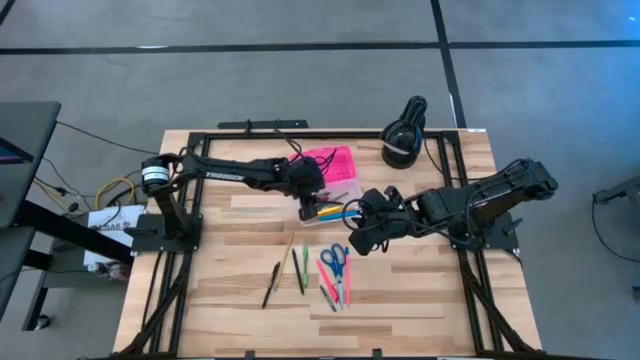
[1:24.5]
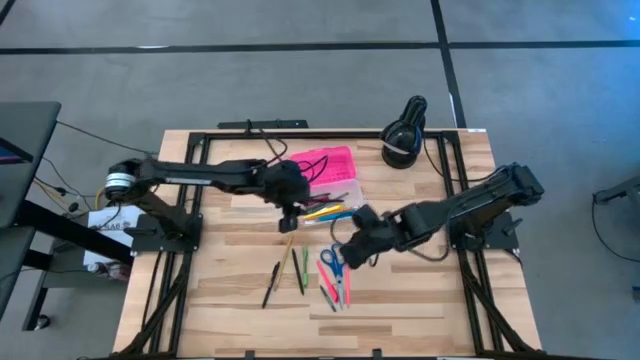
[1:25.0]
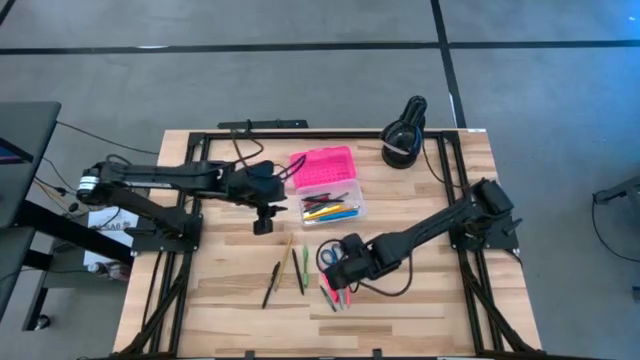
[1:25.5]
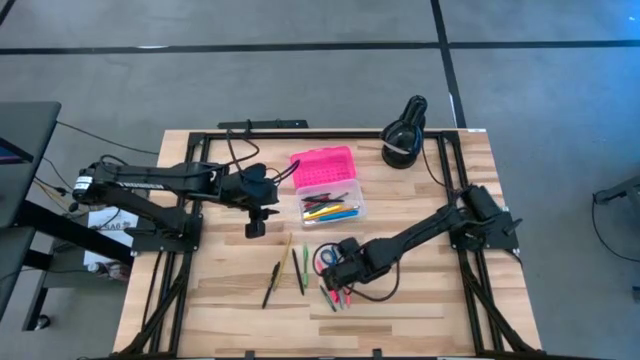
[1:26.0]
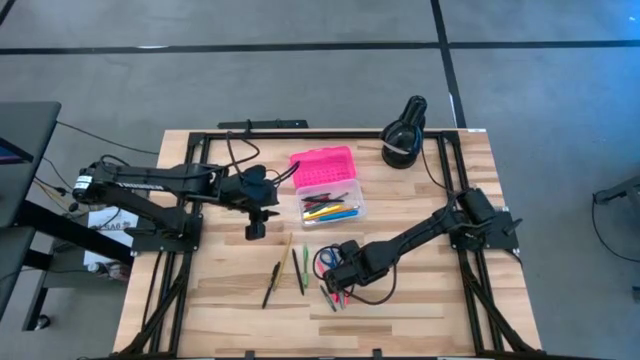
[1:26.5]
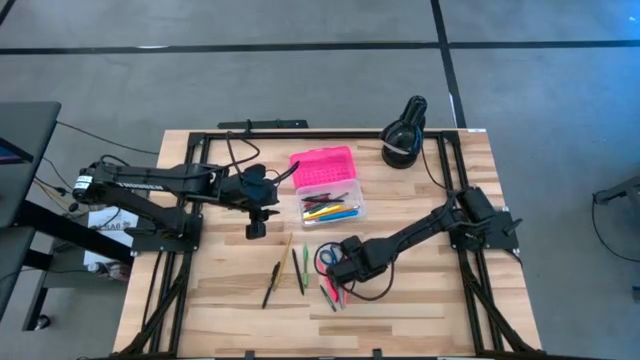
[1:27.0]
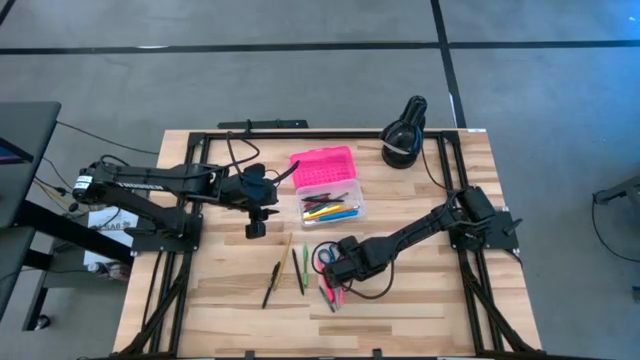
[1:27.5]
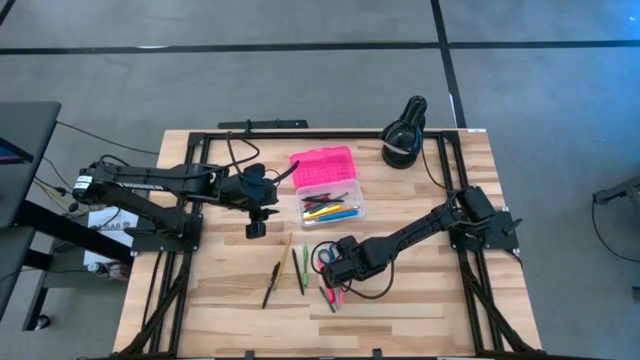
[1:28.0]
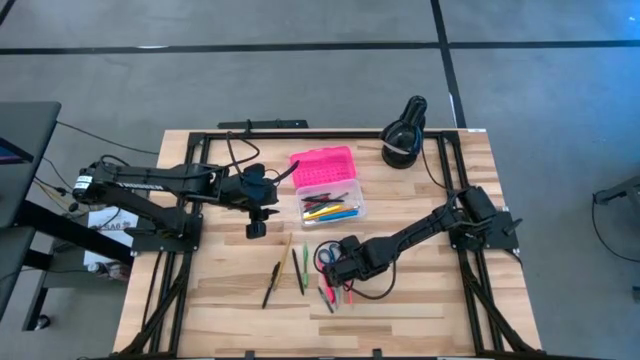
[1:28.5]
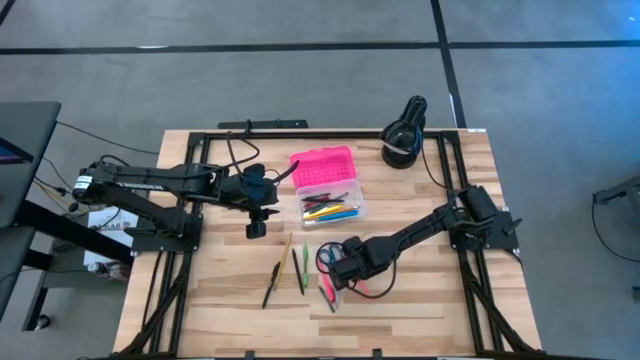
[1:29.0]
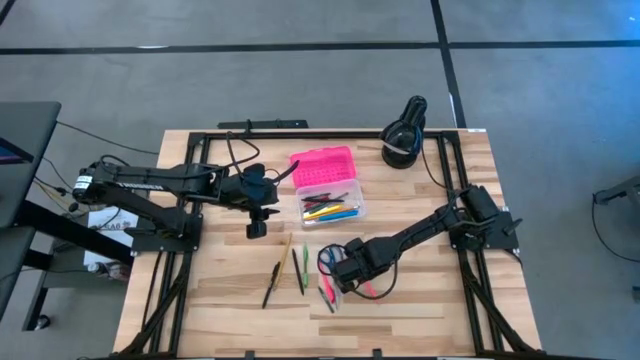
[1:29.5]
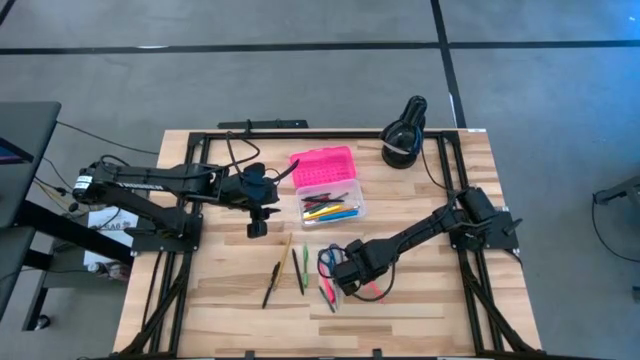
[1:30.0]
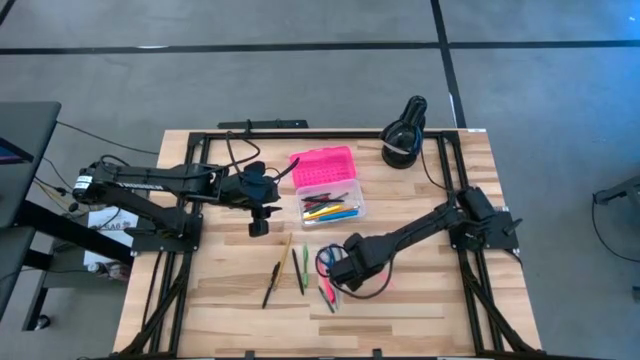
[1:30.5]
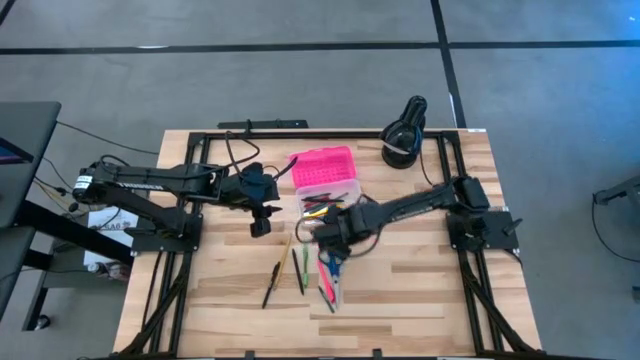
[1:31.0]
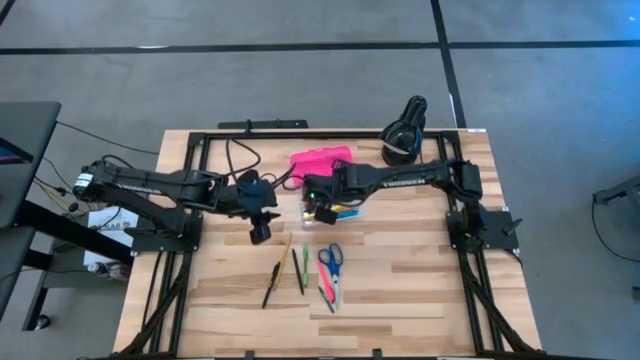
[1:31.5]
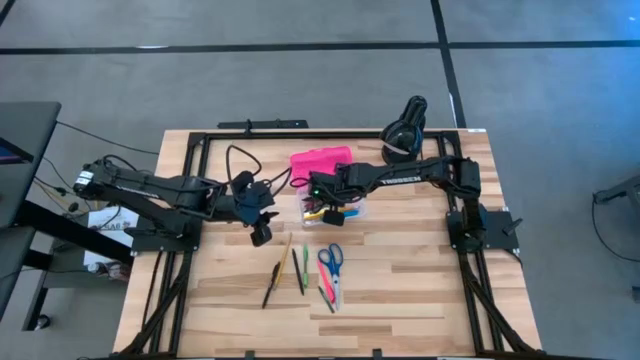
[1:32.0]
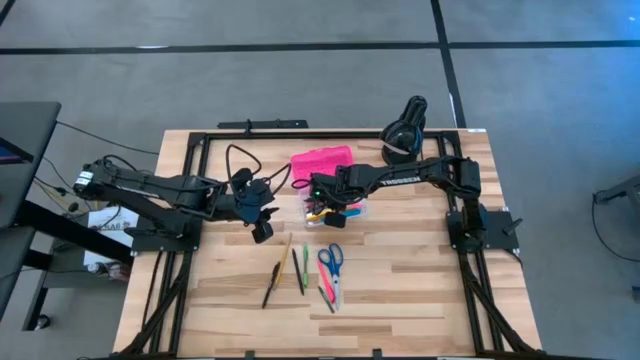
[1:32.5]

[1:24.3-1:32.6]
Task: Pick & place school supplies into a supply box
Put the pink pencil into the pink supply box

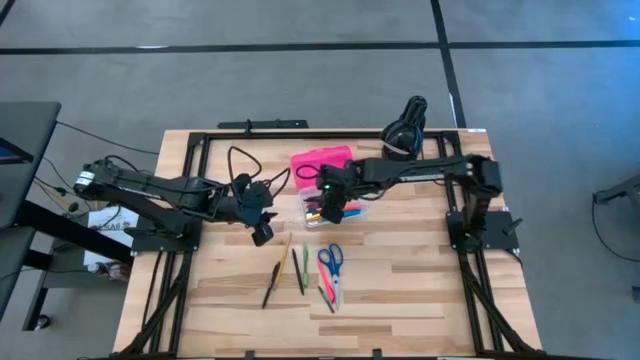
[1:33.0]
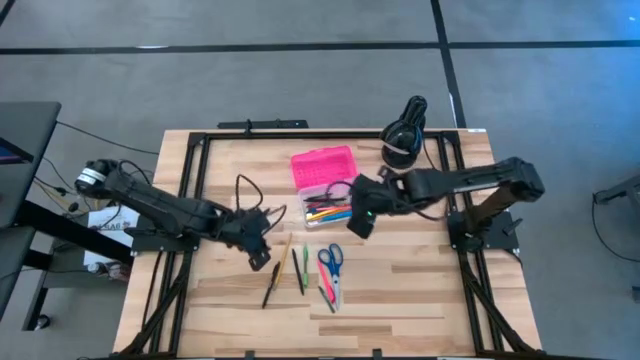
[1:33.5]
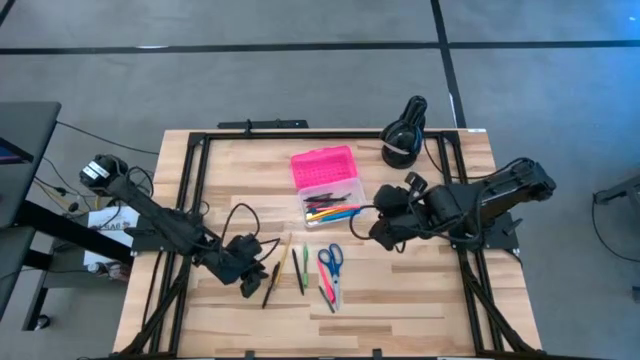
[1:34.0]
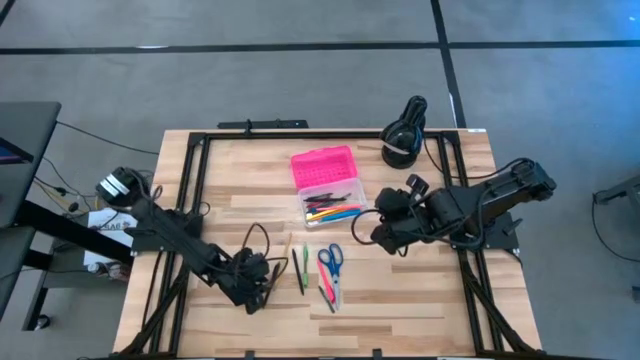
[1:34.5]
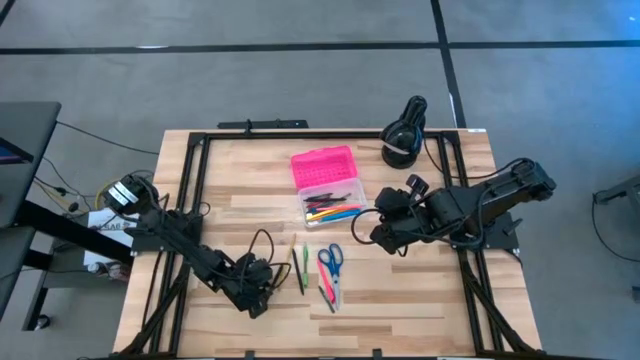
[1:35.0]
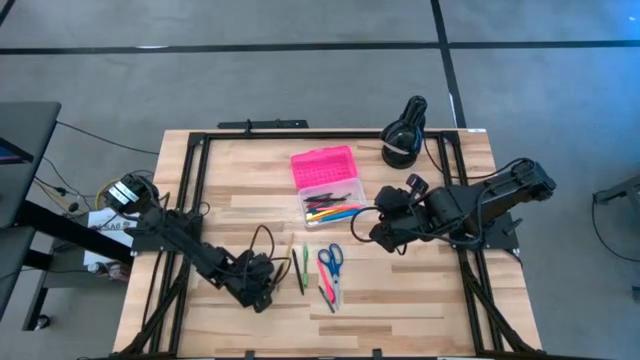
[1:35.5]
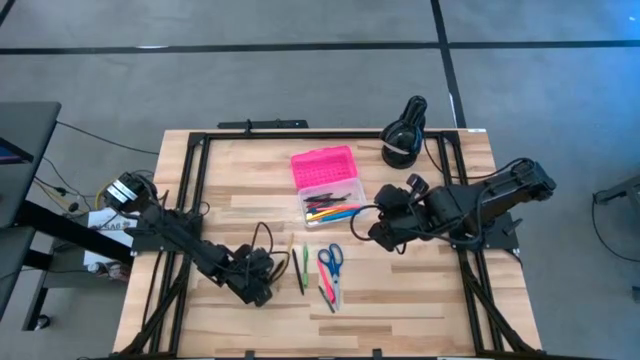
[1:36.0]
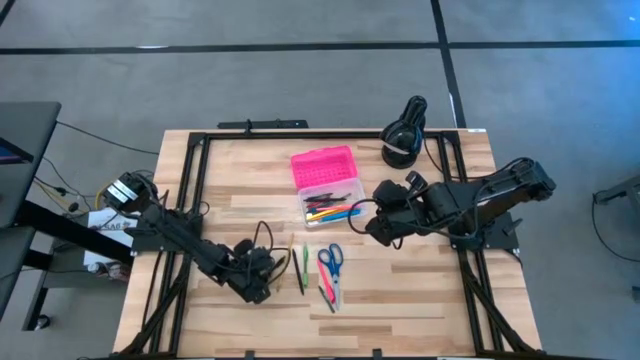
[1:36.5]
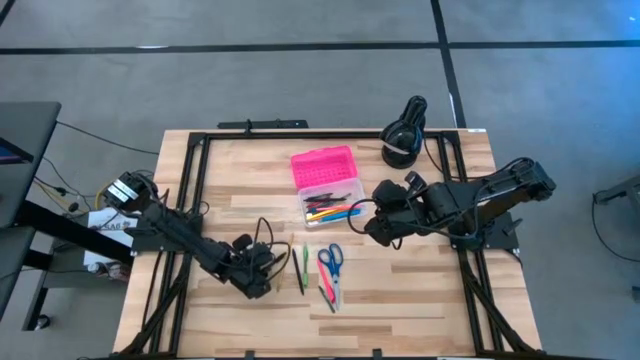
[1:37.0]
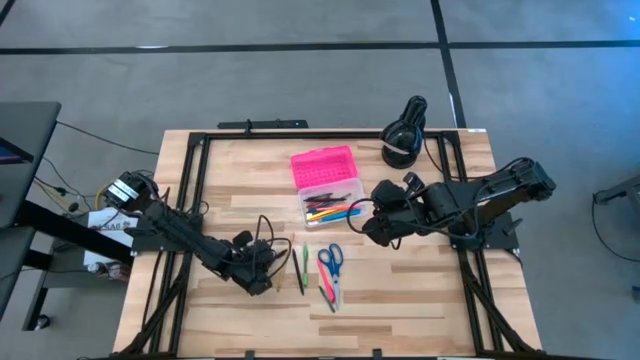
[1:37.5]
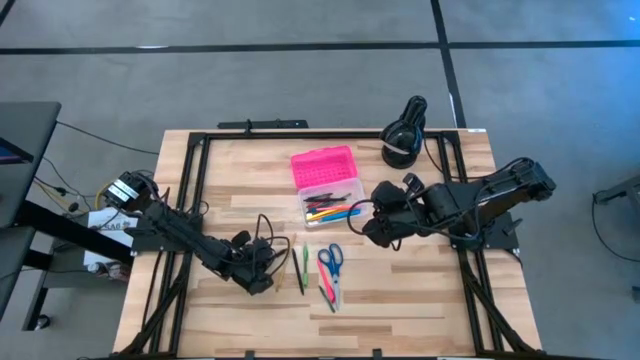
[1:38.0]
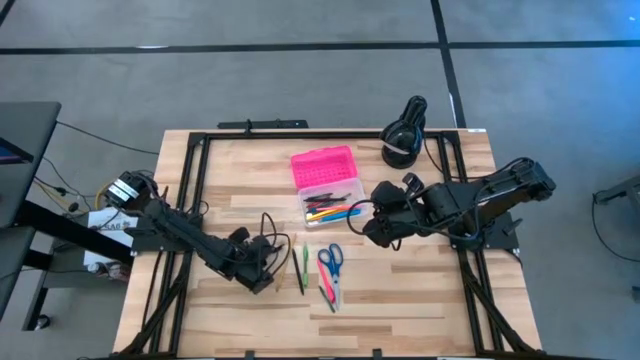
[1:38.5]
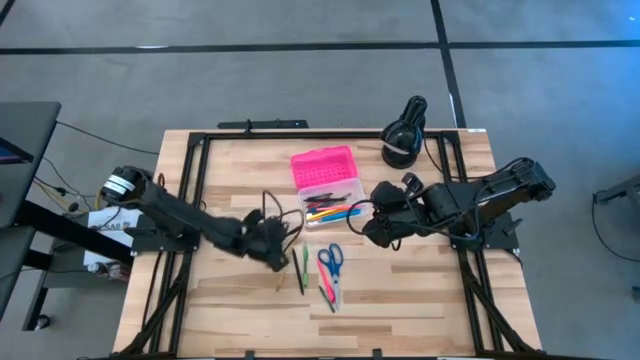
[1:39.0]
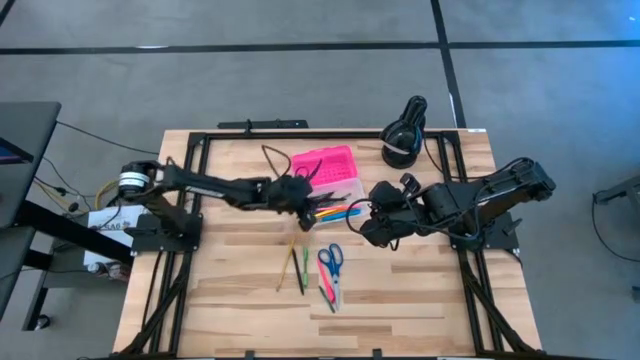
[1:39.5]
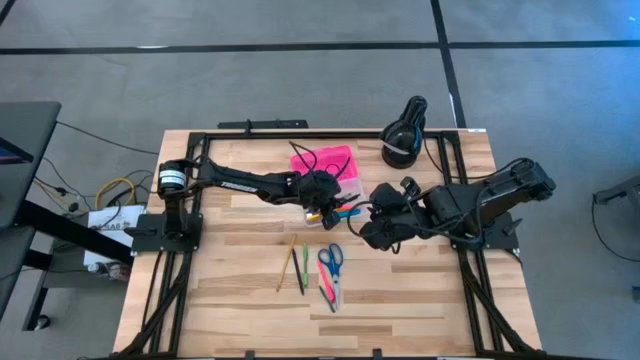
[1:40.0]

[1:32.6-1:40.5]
Put the black pen into the pink supply box

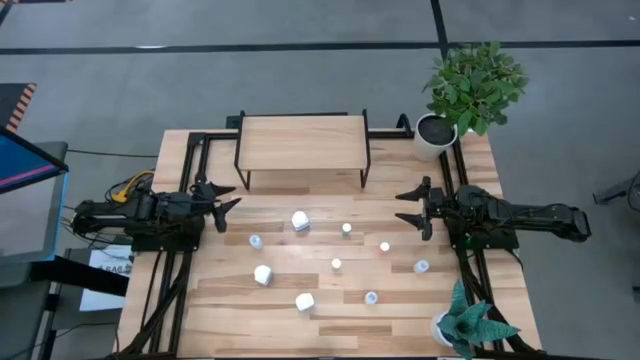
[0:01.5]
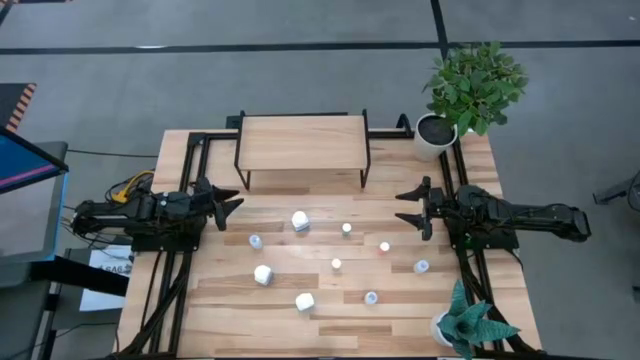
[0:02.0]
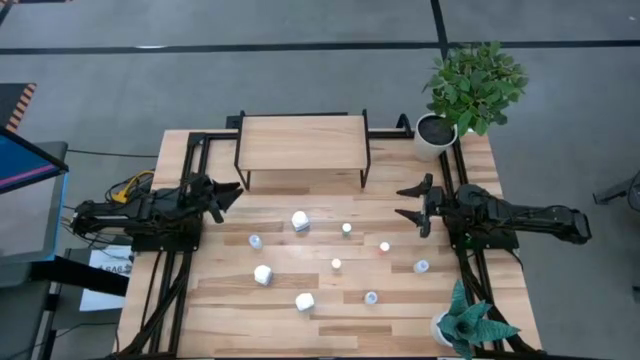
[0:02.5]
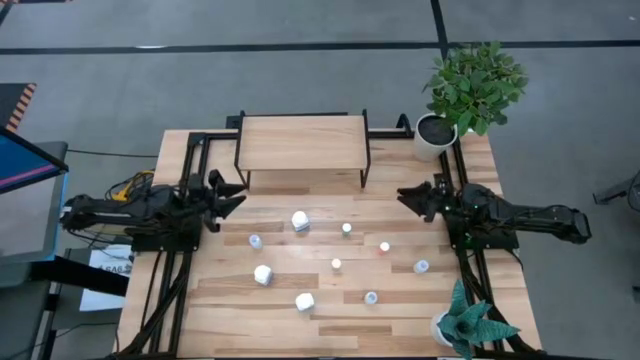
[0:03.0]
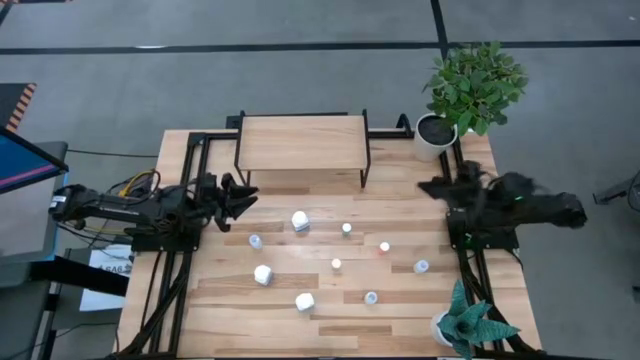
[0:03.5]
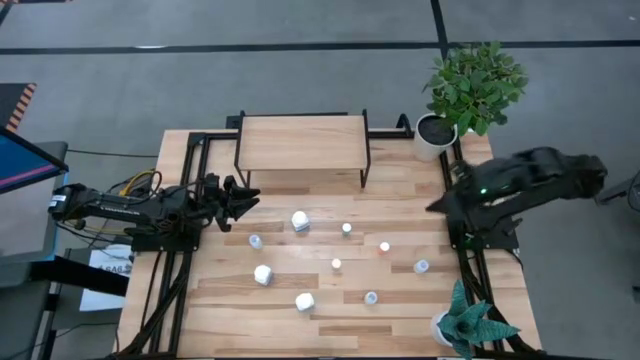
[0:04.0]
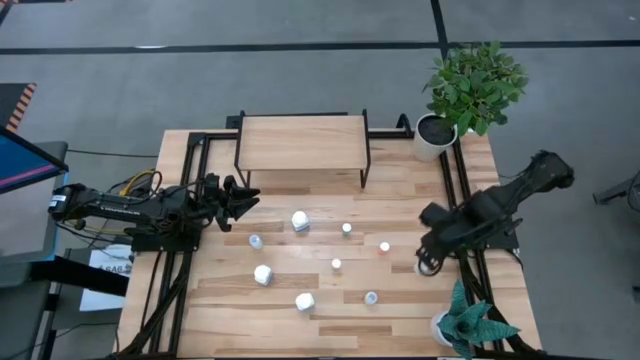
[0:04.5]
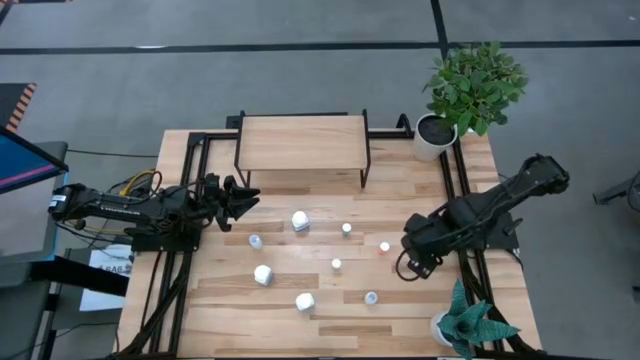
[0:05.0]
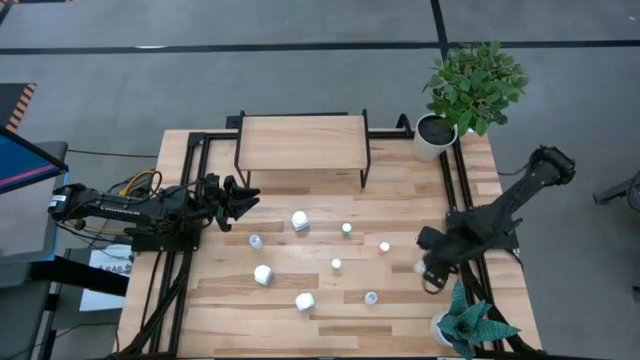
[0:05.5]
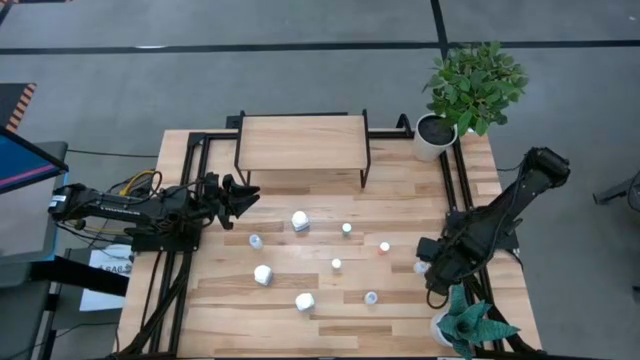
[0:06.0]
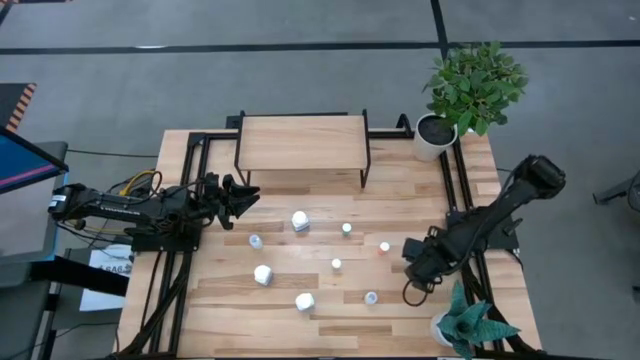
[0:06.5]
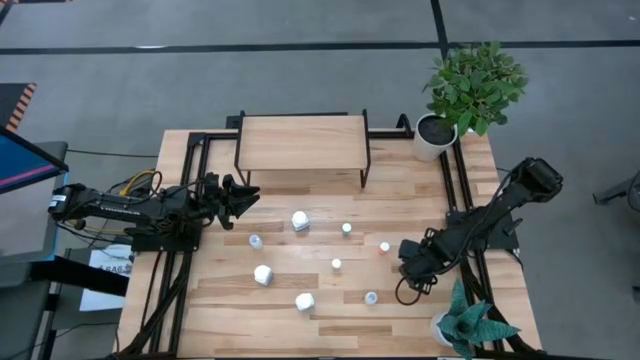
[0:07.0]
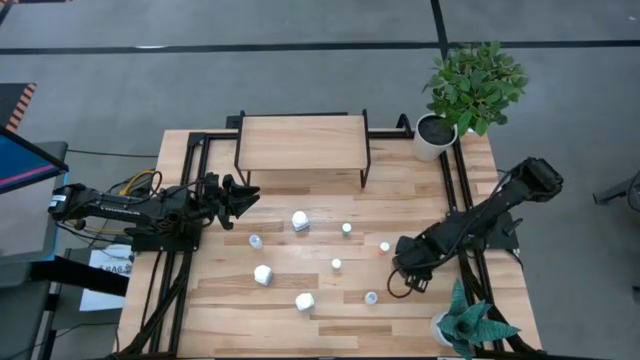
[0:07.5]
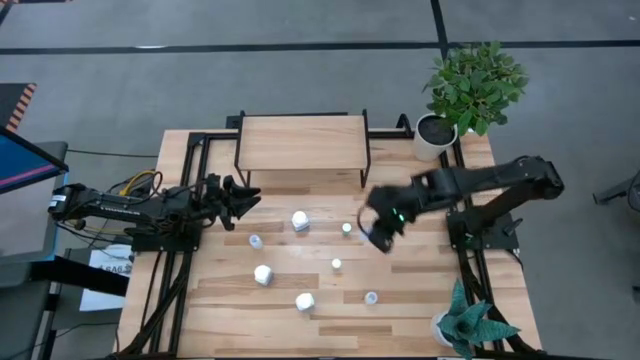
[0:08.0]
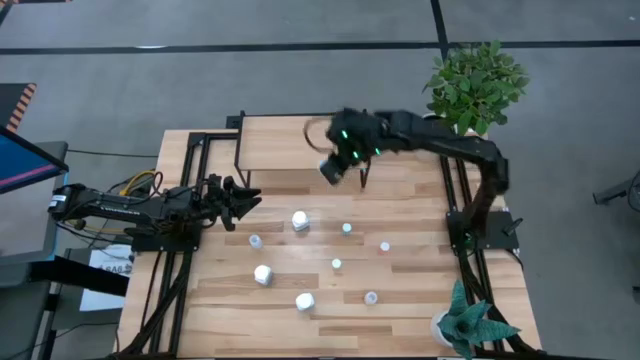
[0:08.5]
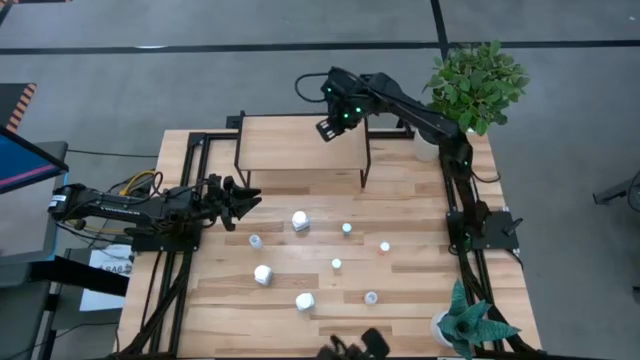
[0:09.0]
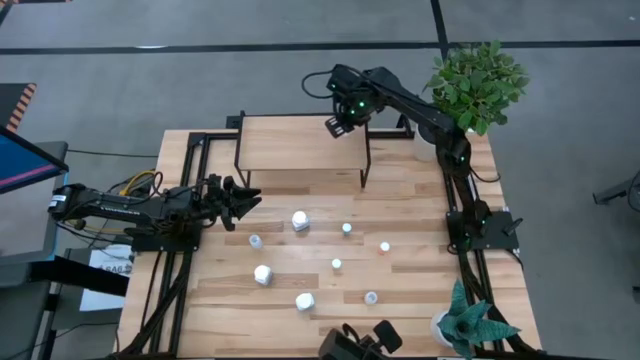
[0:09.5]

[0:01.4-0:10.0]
Task: Pick and place medicine bottles onto shelf by color
Put the middle right transparent medicine bottle on the shelf
